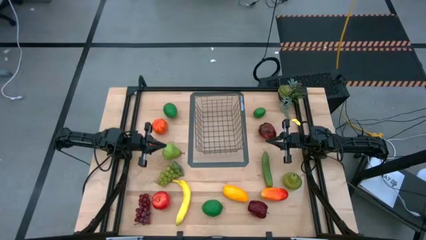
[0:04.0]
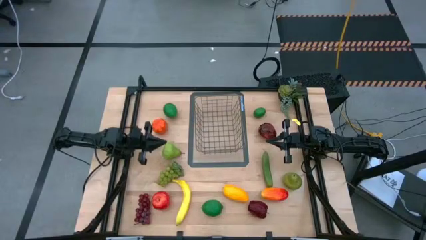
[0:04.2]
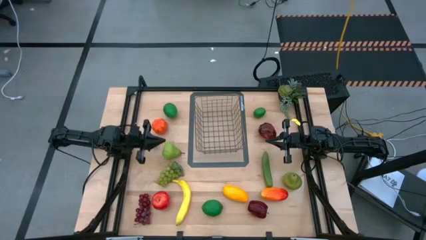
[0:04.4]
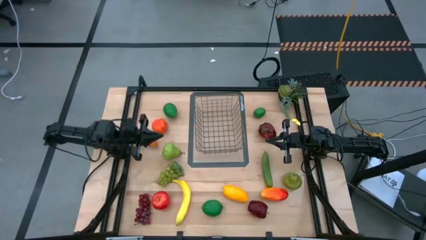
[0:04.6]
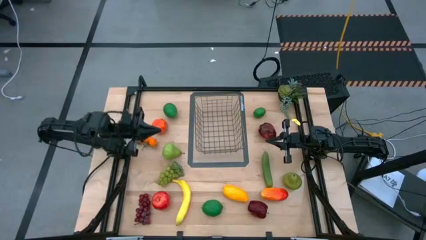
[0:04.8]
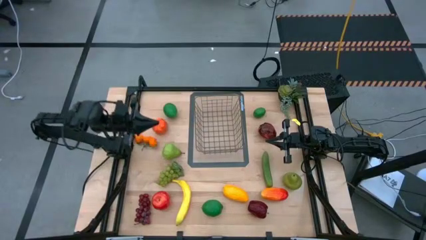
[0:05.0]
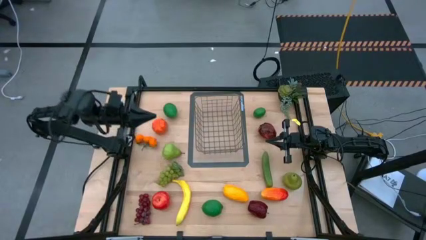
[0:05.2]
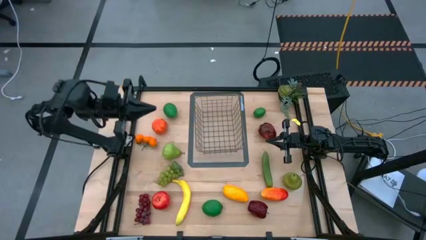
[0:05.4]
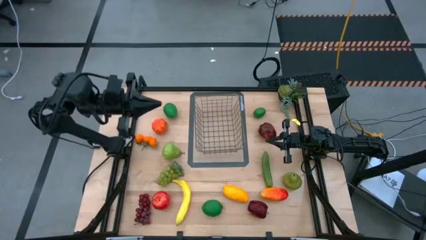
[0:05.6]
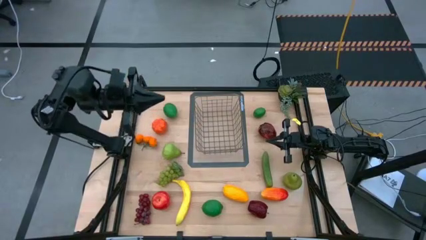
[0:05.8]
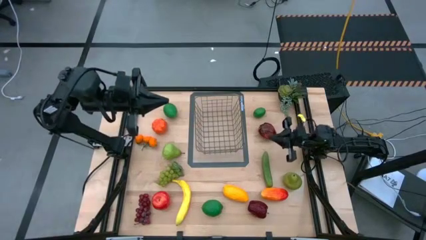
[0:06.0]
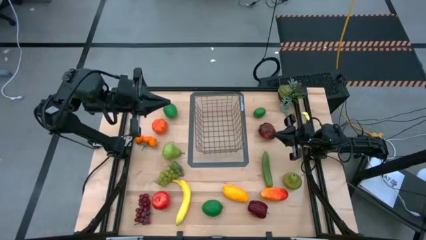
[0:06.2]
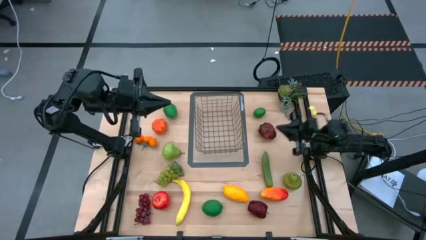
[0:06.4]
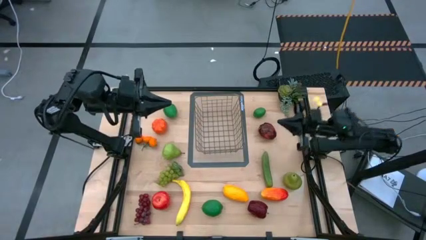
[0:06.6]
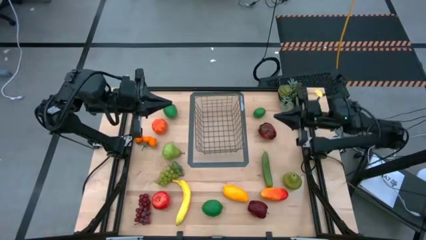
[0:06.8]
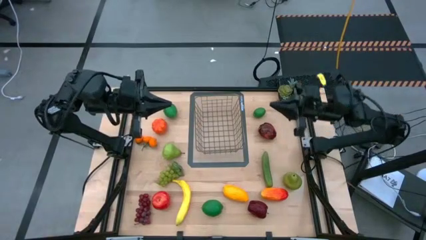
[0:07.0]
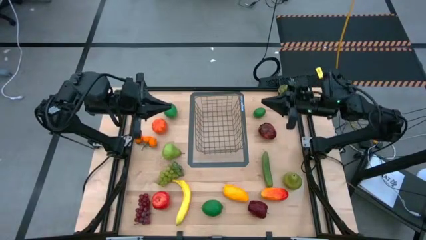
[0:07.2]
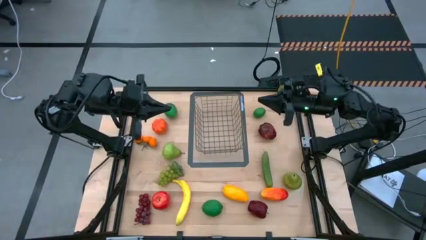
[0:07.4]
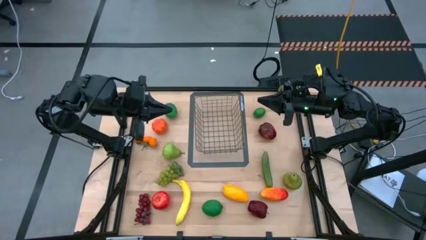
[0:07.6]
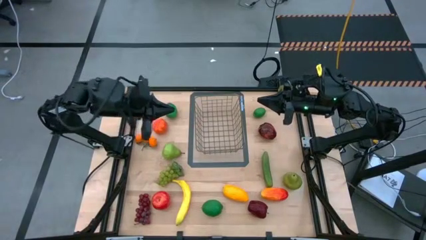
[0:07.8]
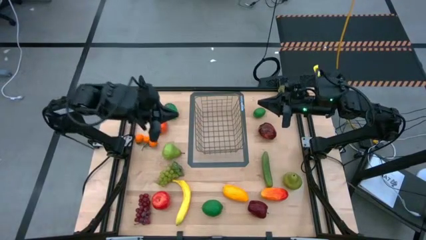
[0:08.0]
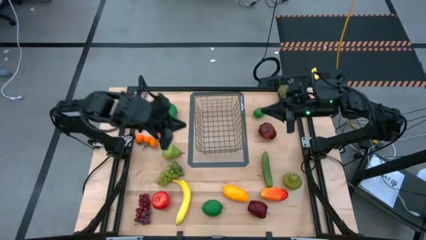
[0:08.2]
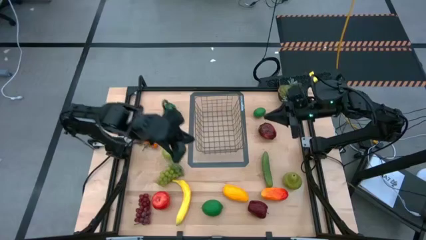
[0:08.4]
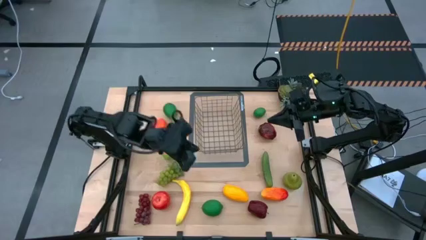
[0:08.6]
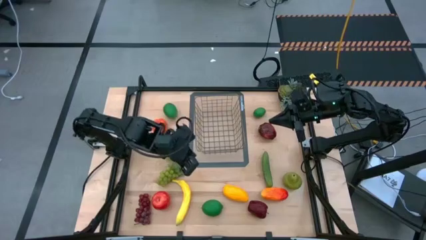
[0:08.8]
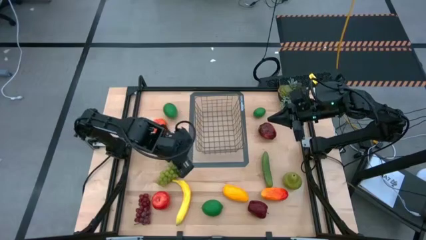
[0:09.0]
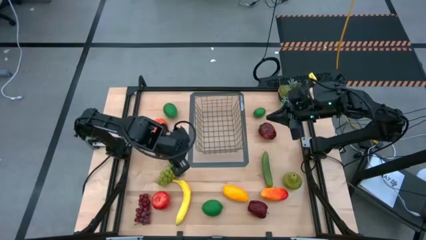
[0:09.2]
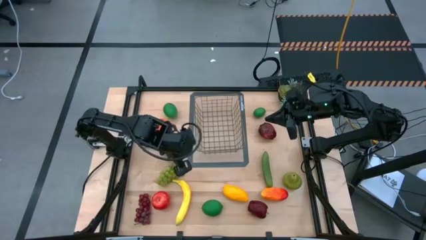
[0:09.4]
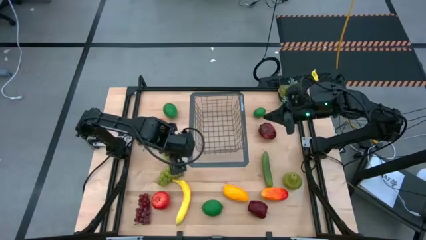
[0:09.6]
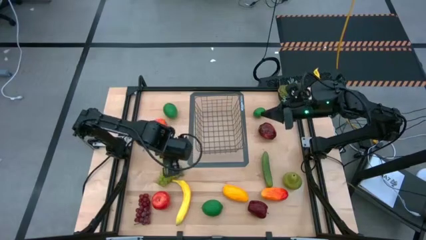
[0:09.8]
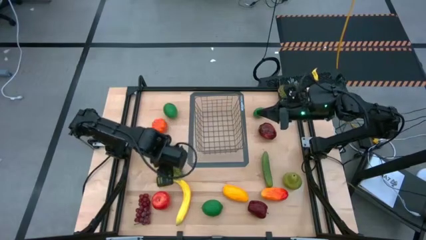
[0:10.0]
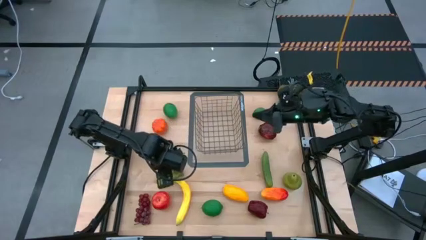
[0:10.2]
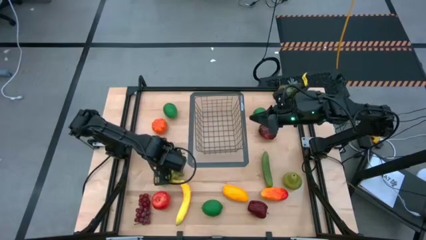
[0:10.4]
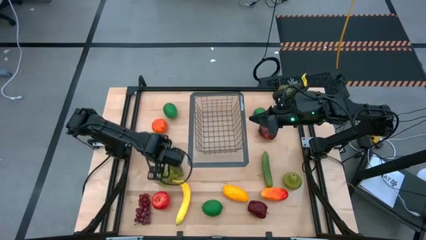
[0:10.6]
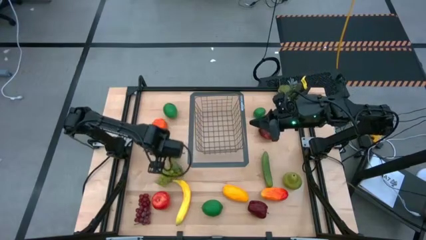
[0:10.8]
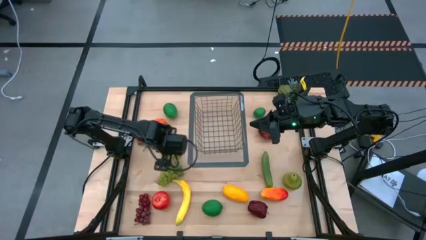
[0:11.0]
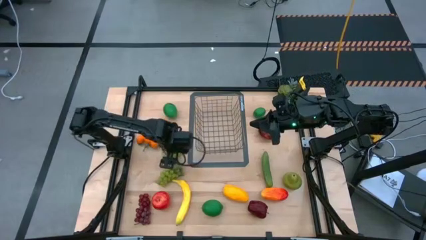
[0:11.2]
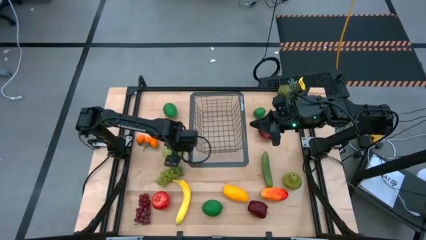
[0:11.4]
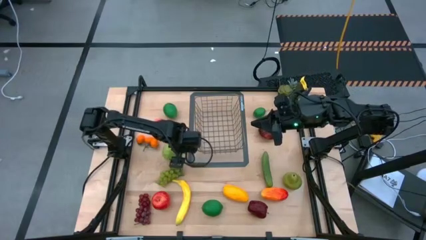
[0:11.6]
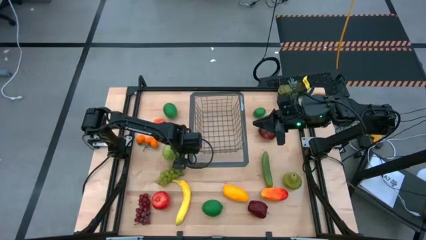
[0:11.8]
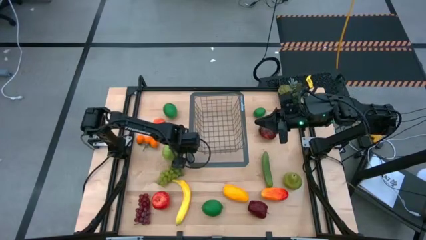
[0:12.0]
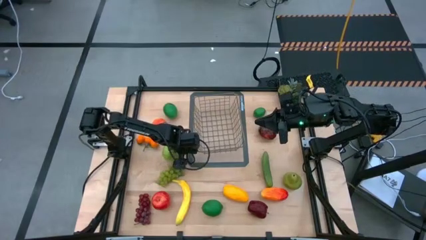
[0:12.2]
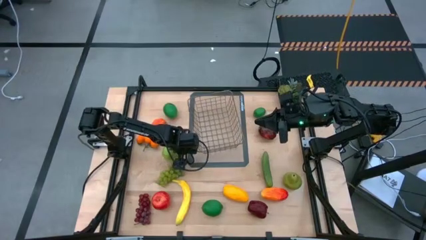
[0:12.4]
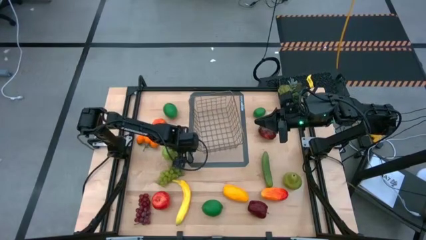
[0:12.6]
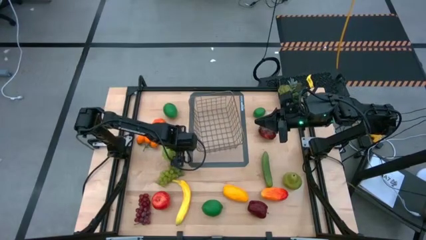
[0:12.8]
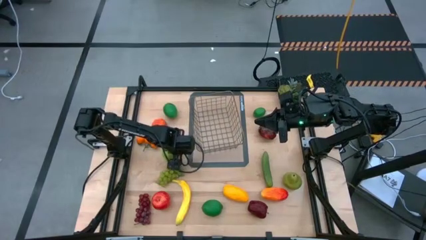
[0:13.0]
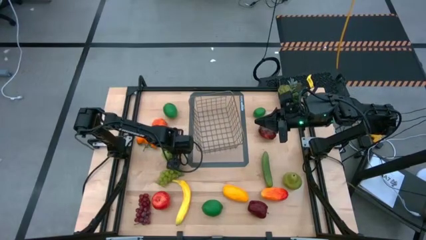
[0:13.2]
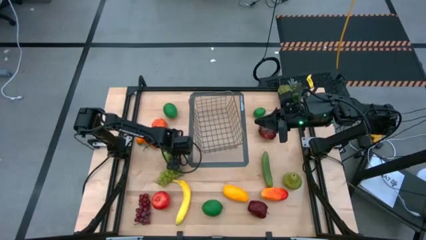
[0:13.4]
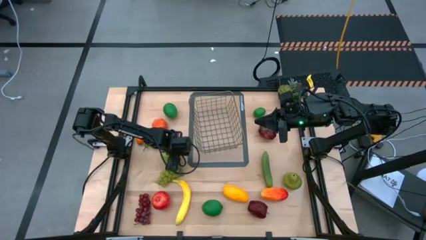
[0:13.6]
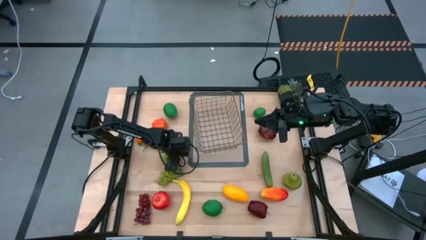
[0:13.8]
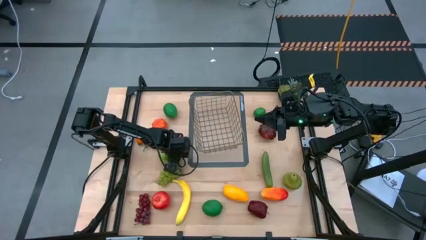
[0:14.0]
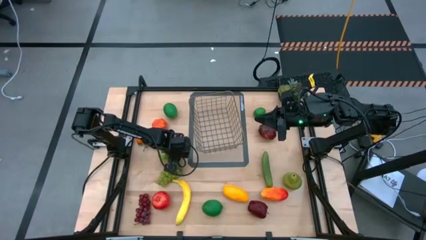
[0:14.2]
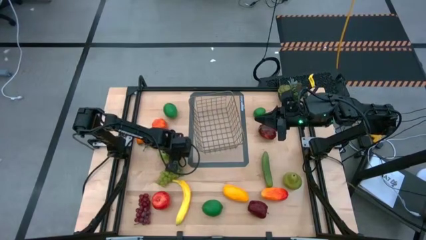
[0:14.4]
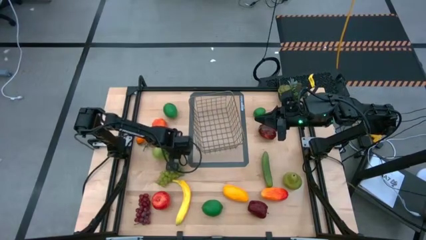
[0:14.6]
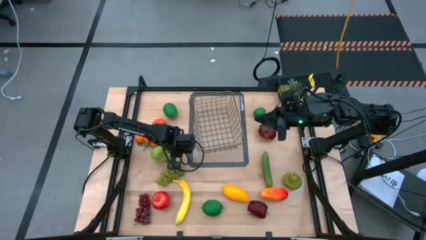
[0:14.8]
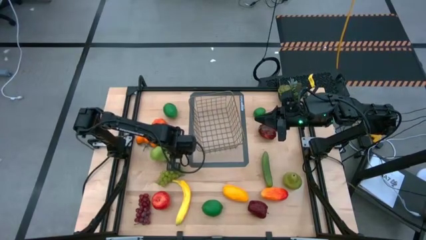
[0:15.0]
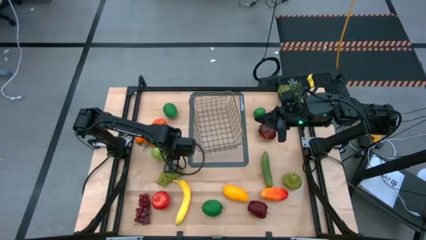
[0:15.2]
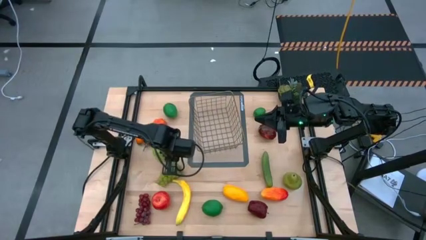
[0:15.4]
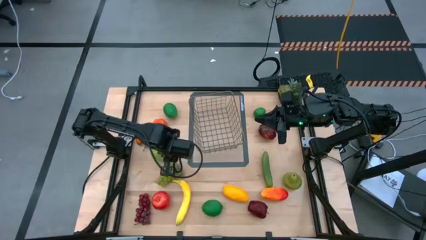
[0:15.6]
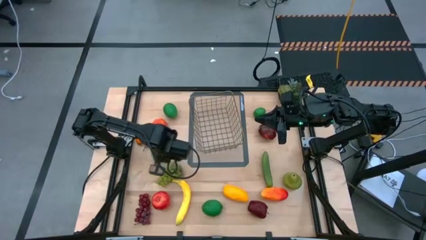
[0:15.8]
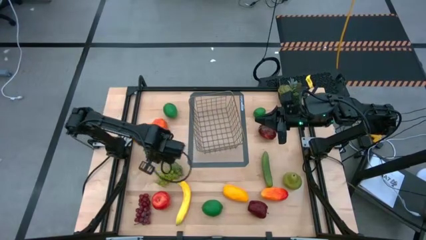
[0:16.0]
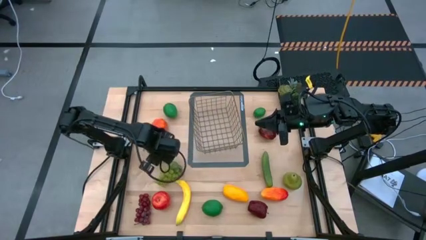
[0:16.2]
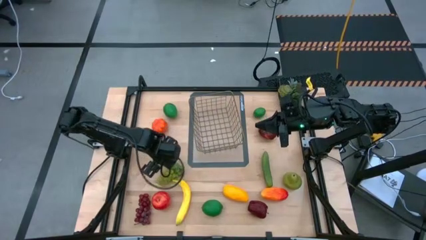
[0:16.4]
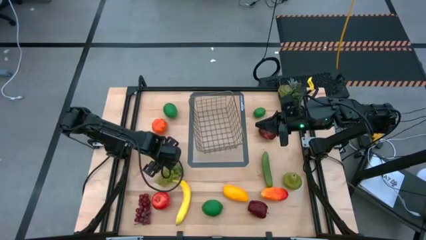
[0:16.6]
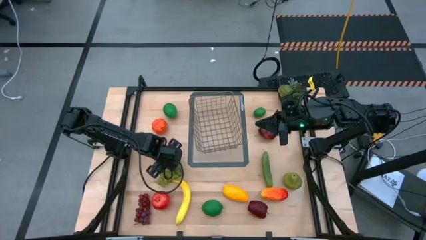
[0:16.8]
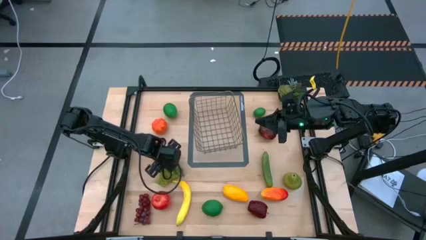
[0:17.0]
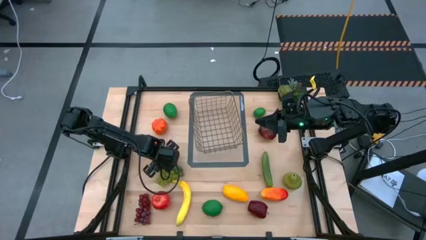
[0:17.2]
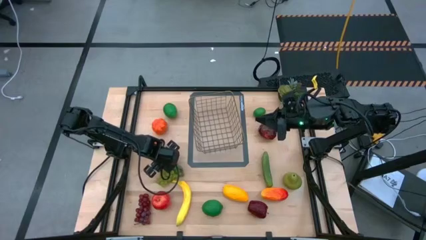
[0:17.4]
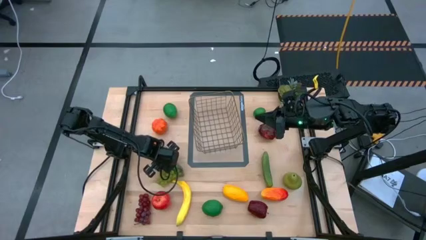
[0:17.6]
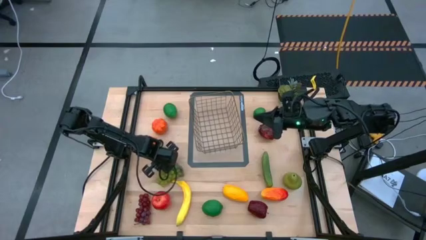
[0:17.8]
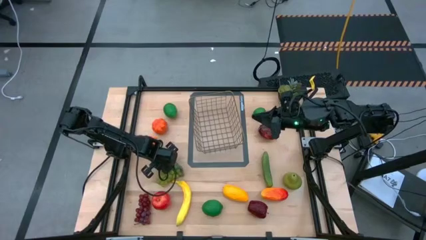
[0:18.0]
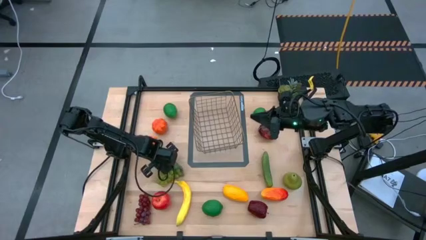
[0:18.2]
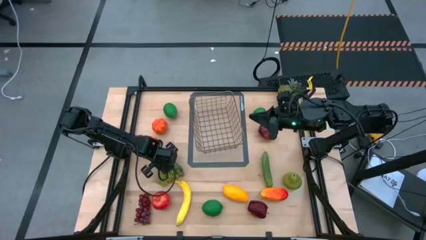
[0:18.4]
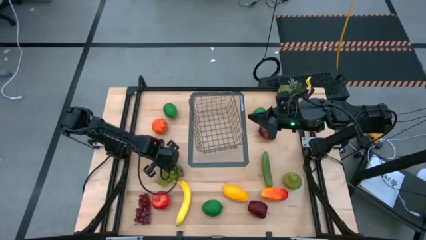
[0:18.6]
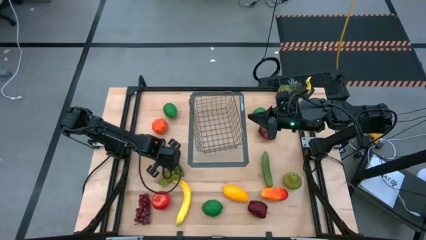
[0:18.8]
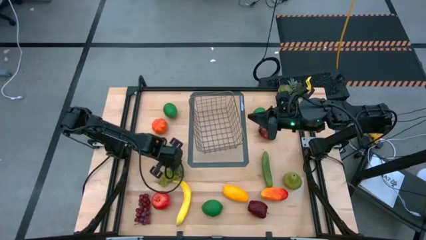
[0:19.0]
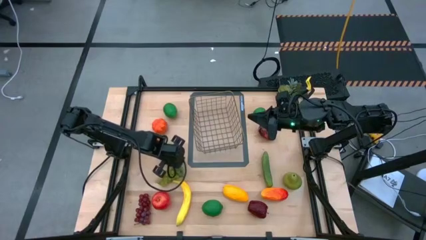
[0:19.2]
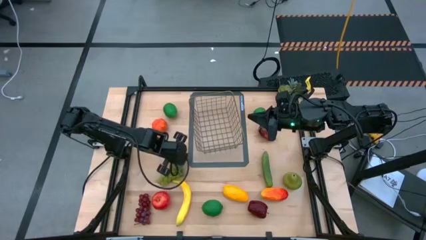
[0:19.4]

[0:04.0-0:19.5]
Task: Build produce basket
Put the left green pear into the gold wire basket
